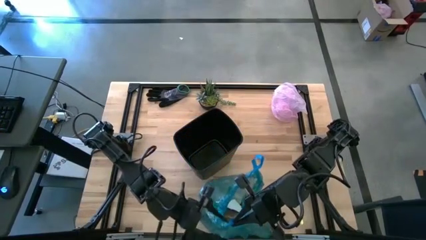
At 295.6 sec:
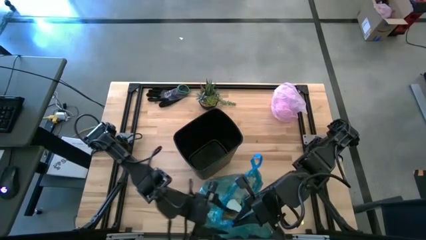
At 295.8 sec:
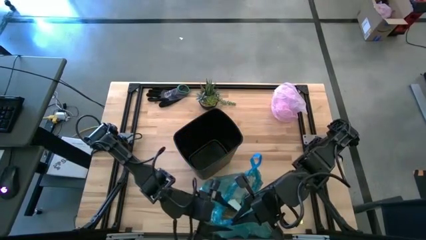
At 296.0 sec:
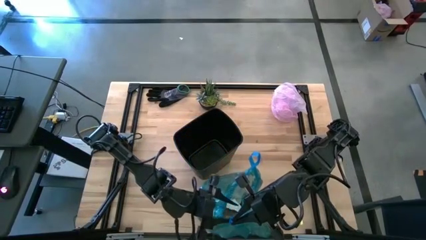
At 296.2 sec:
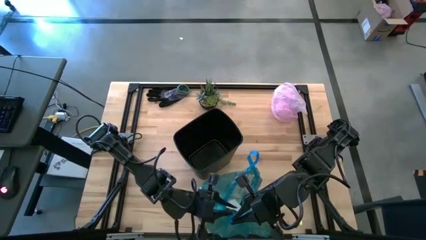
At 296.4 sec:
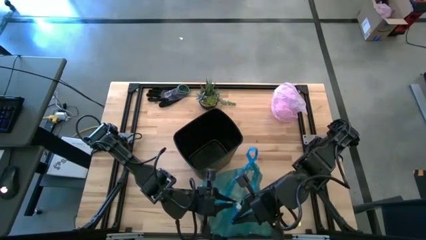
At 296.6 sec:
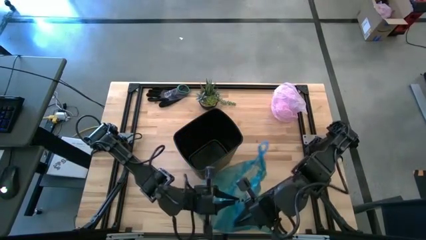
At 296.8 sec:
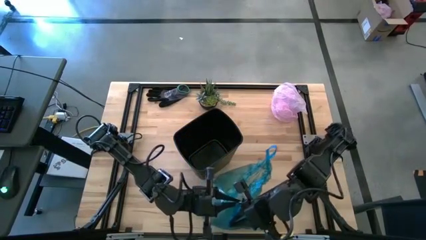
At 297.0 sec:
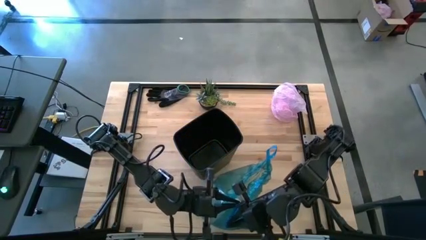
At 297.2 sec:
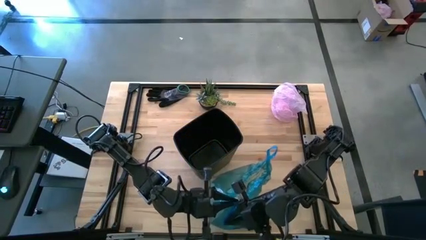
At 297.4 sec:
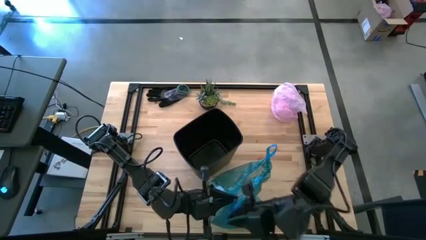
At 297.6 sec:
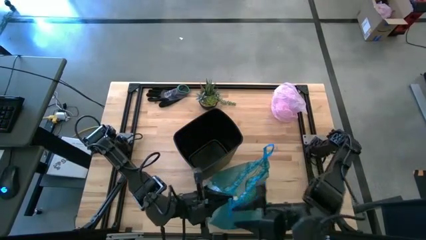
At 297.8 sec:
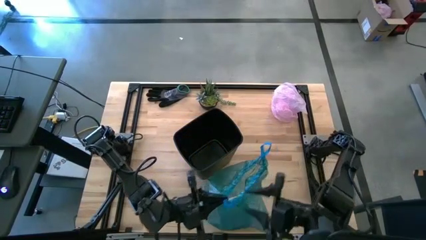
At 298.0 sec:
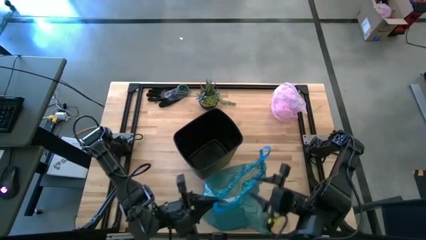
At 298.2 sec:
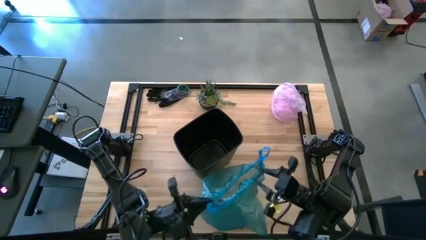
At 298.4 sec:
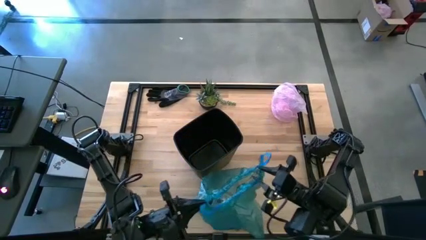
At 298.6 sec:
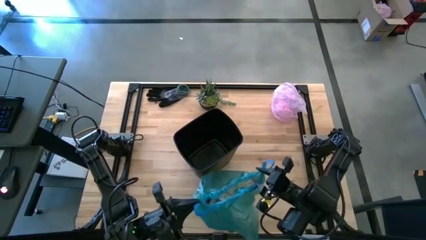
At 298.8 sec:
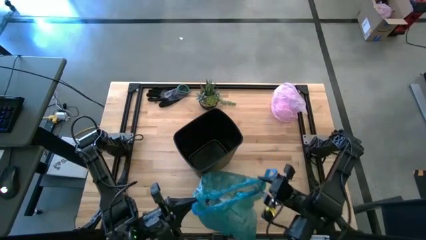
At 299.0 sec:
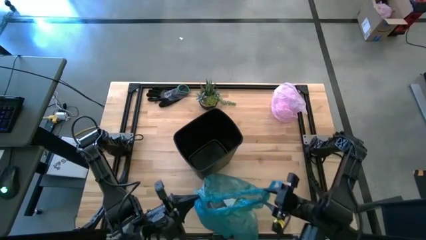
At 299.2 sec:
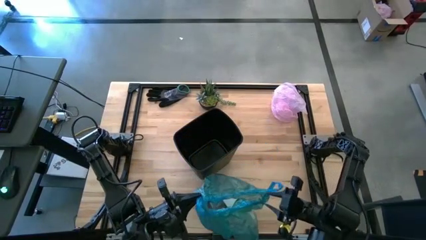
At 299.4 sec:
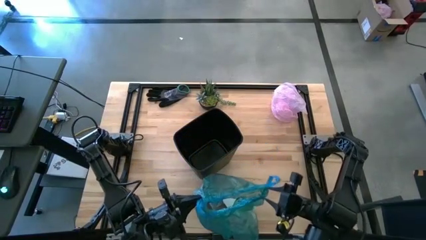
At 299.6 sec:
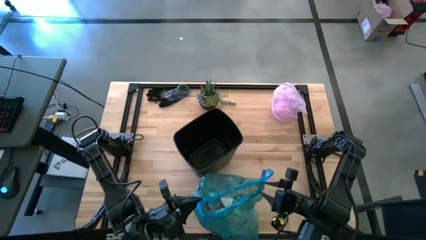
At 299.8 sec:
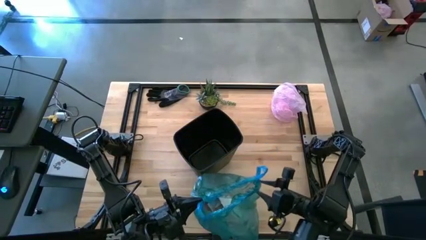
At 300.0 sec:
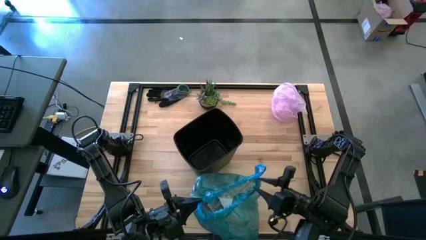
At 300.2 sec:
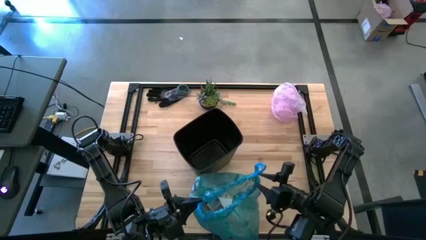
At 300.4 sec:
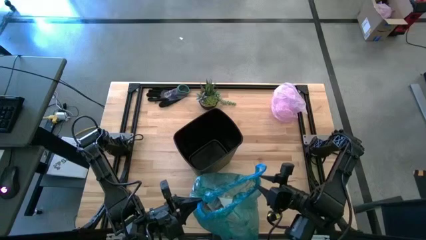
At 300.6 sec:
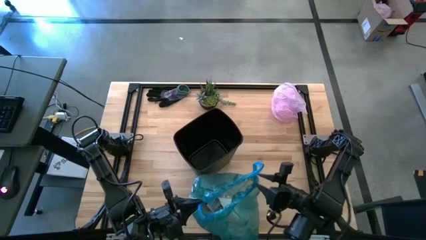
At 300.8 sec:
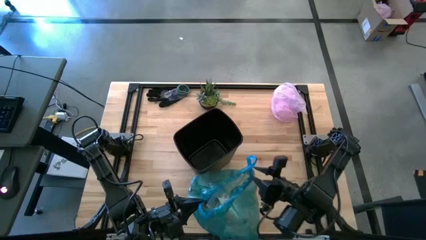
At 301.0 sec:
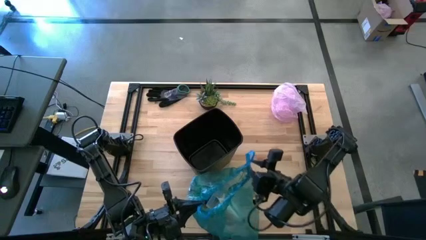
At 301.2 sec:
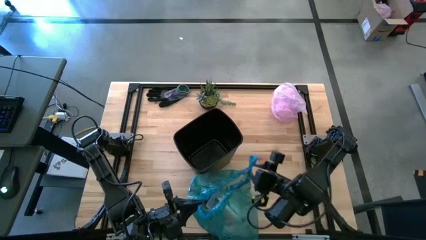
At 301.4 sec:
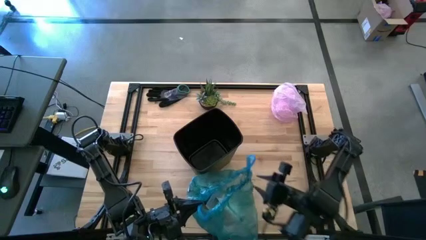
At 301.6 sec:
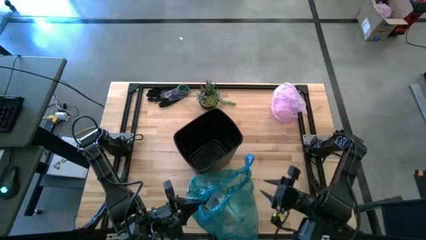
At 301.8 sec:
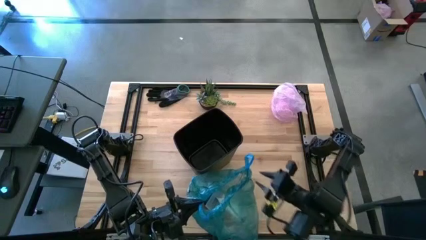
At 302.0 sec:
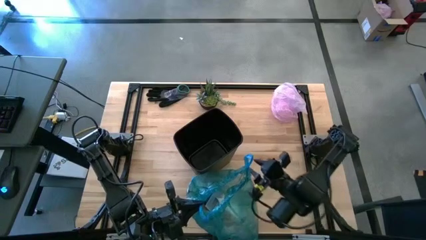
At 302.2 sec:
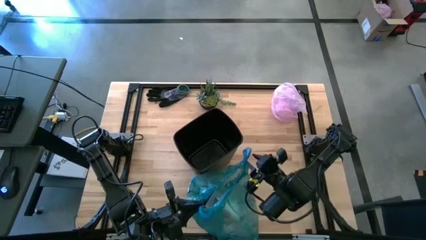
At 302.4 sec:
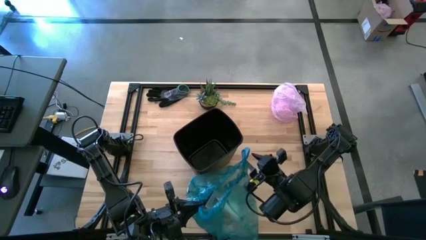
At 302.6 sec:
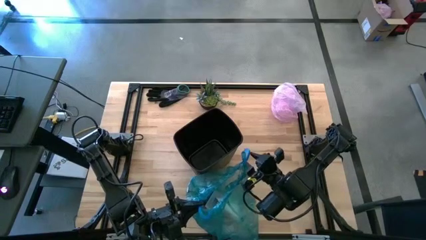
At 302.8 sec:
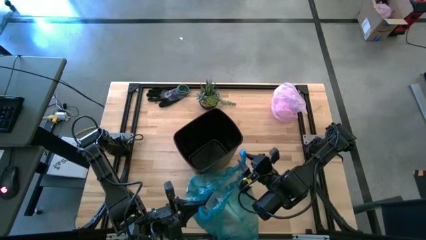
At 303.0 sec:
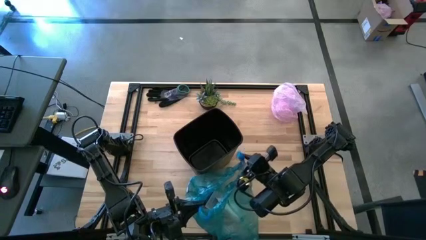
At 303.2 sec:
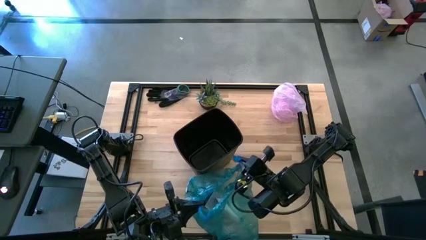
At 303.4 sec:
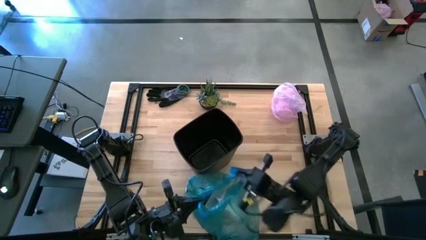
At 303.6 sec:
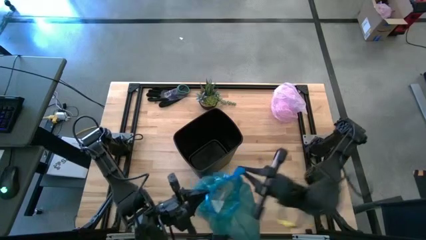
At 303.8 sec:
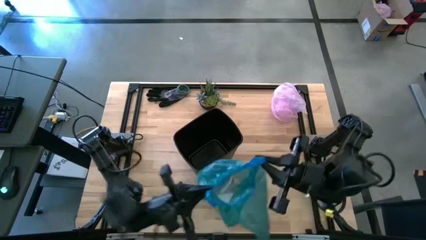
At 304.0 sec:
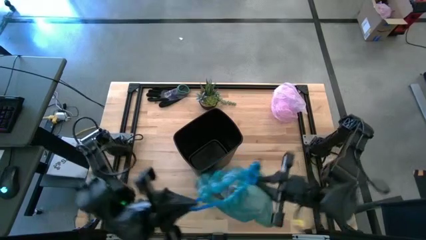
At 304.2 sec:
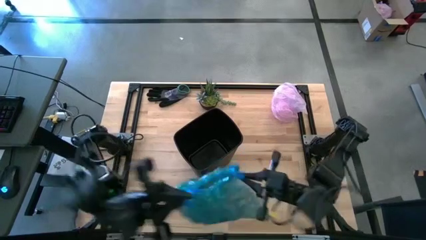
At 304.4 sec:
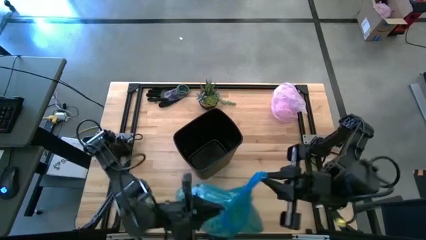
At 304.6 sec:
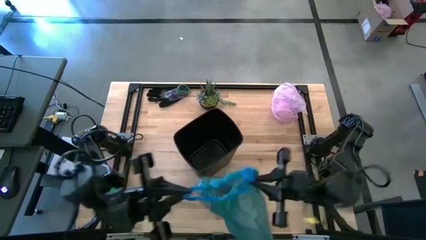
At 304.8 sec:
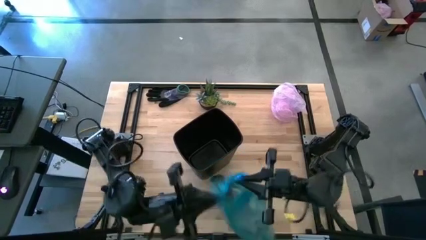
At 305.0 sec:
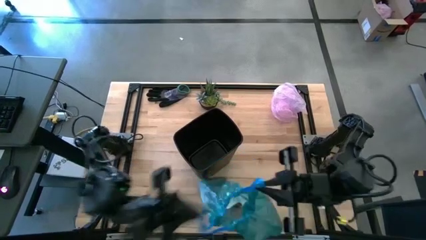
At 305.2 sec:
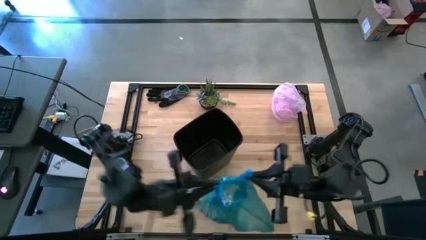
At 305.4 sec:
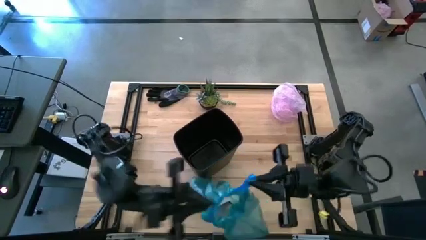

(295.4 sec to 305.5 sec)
Task: place trash/remove bag and relplace
Close the blue trash bag
